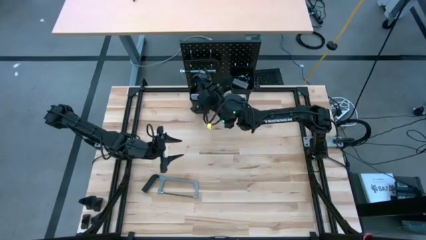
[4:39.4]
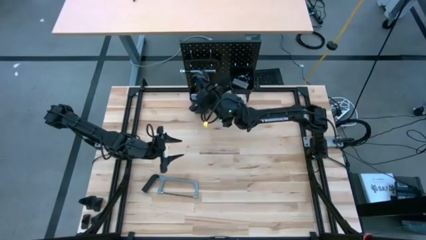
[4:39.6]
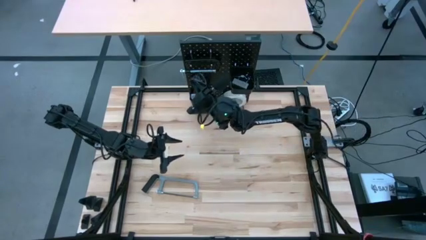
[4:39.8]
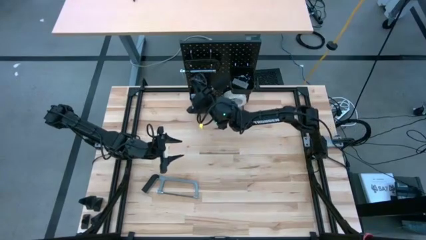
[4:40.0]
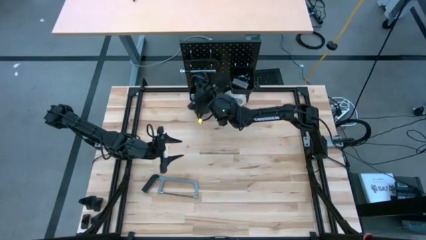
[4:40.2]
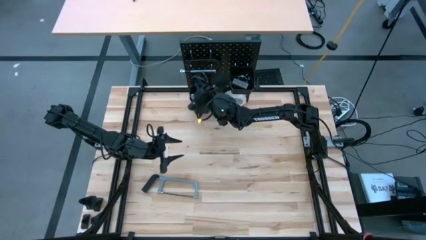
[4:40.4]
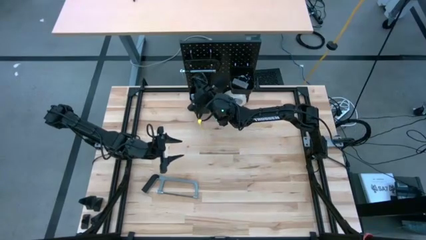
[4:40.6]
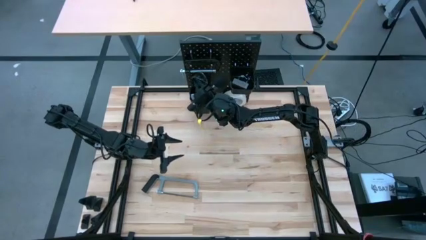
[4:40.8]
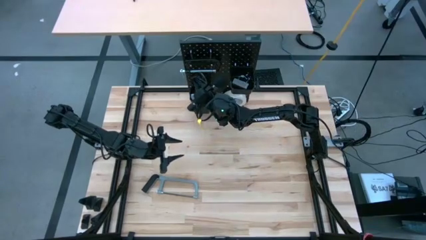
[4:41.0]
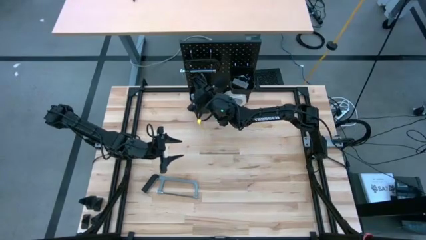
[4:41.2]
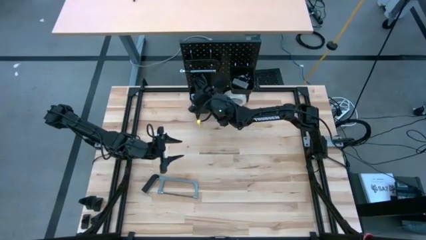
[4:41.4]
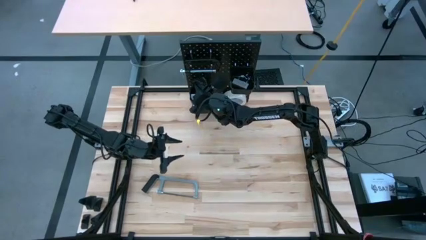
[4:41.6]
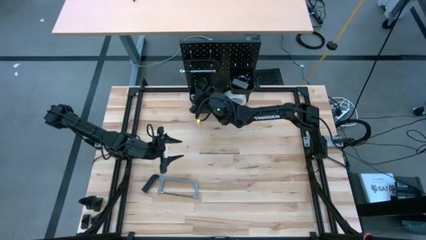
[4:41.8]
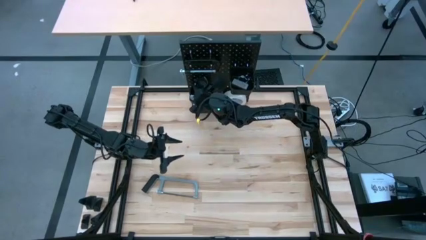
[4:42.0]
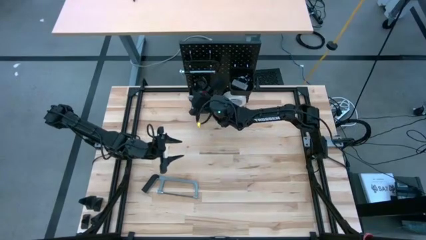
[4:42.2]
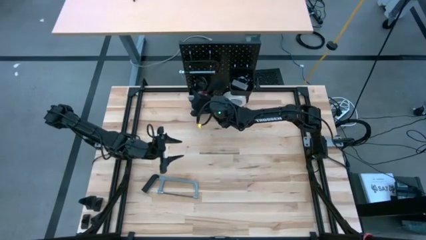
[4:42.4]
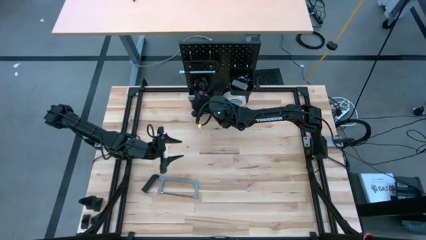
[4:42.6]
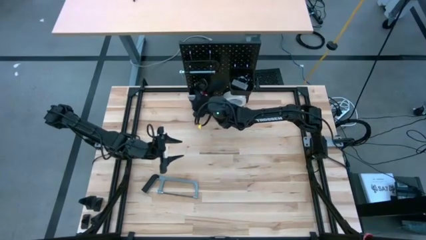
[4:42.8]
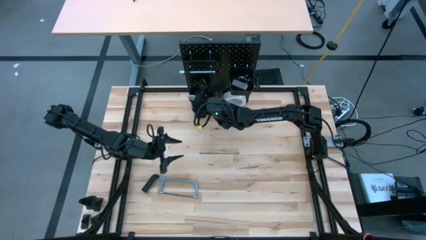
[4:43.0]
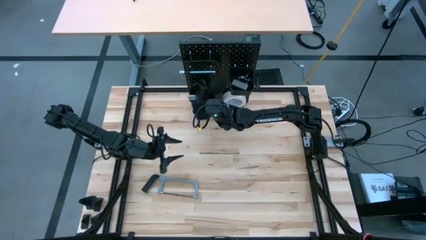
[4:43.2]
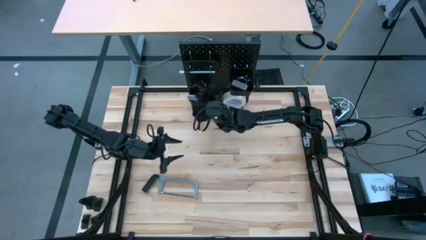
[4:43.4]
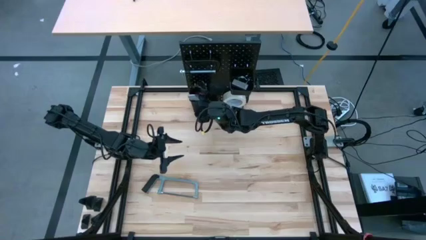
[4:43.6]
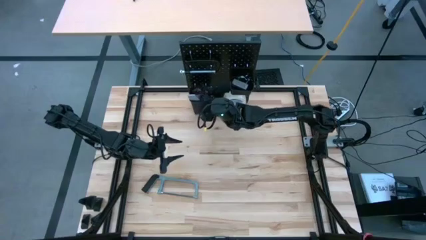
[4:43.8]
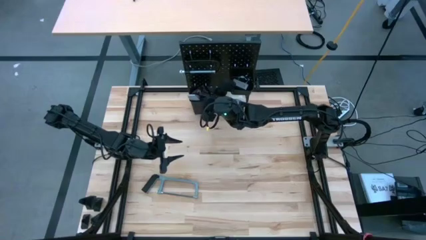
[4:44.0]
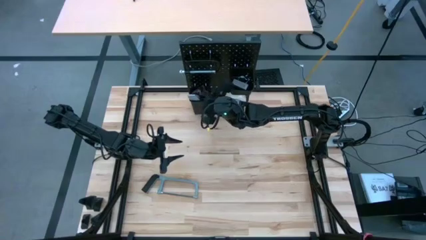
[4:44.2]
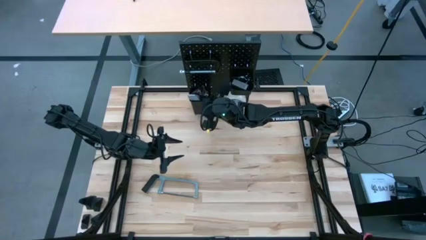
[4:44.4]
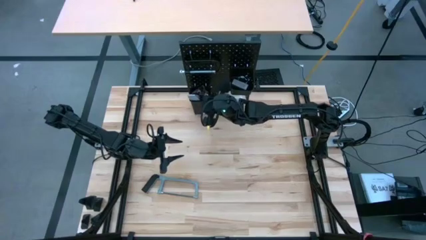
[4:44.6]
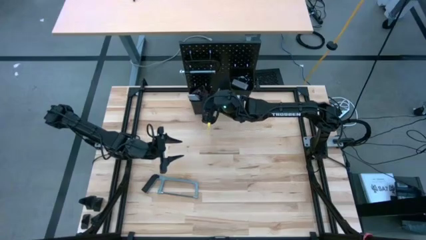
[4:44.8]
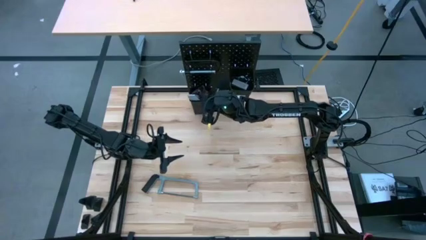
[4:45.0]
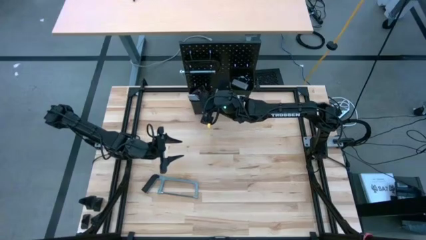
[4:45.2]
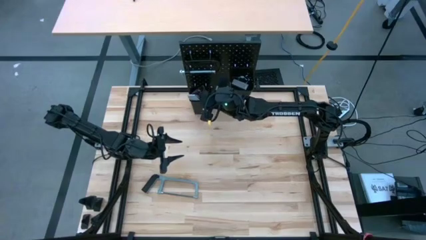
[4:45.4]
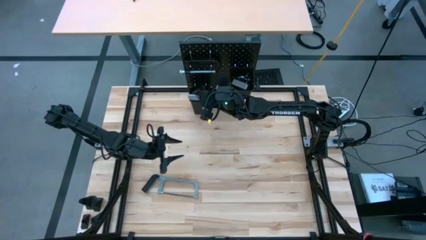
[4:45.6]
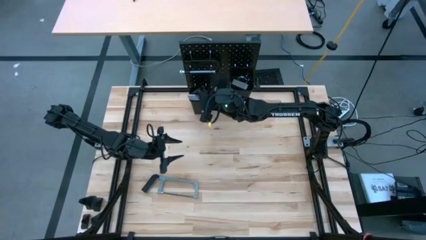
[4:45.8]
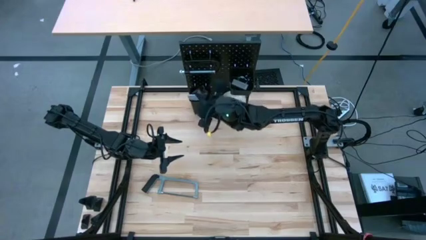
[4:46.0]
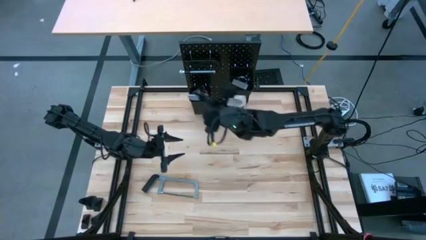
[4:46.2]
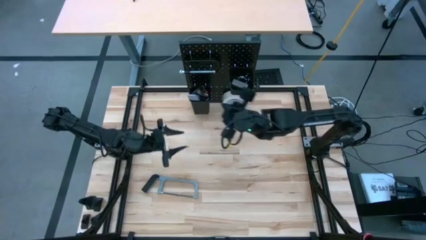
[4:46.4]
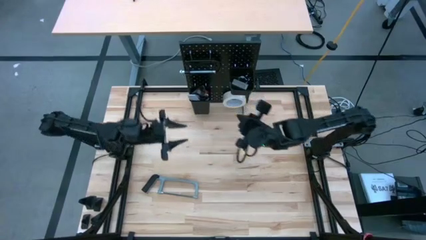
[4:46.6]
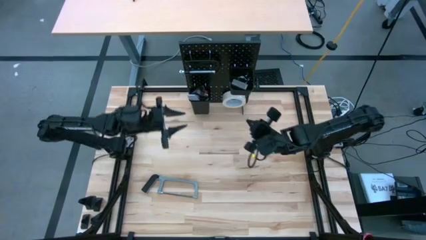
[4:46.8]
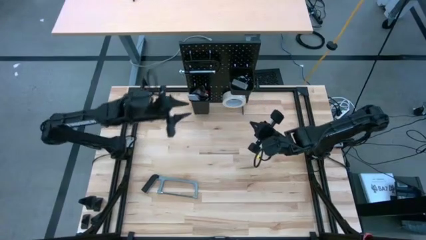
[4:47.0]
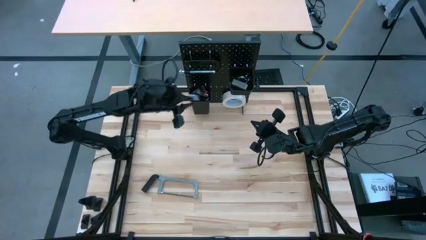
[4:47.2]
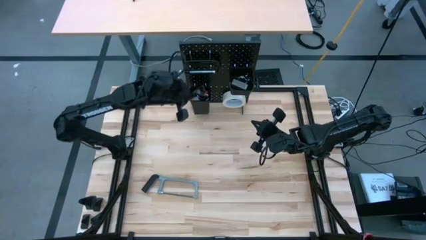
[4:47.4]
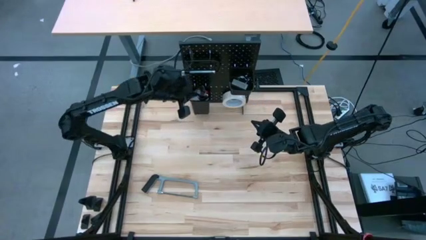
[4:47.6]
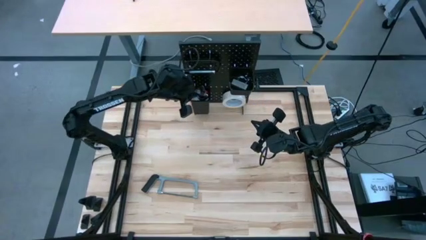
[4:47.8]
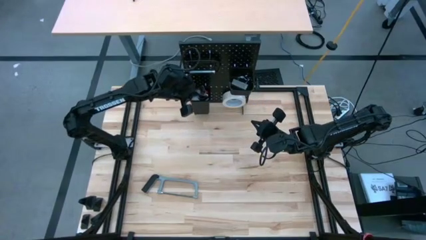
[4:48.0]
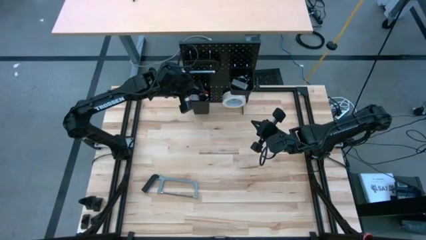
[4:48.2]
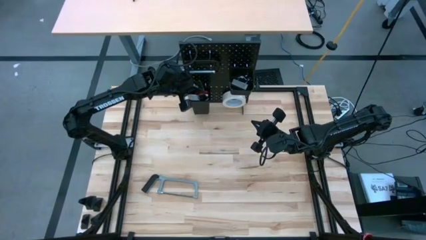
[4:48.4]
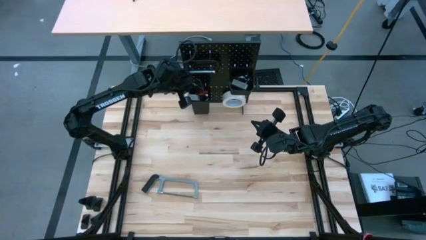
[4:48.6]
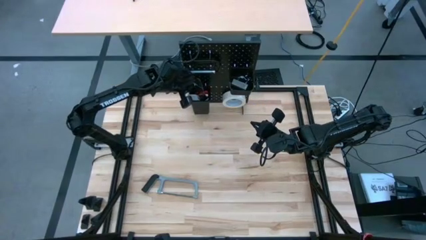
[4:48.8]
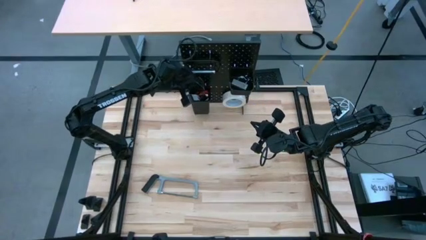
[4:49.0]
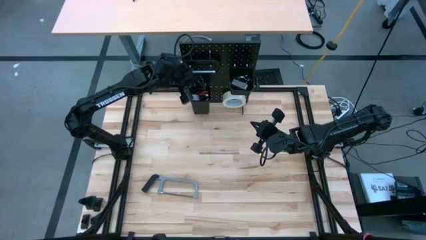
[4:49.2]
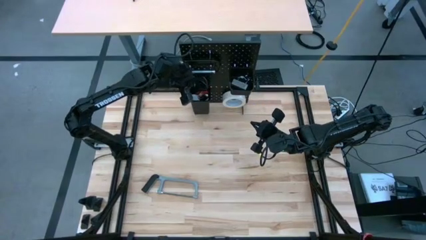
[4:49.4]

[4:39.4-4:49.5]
Task: Hang tools onto peg board
Put the black safety glasses into the left black tool bin

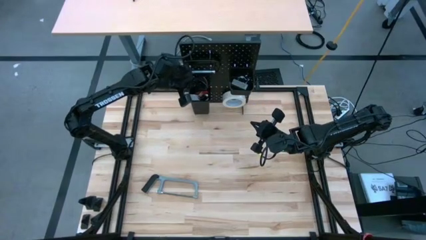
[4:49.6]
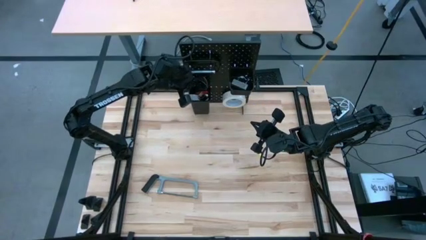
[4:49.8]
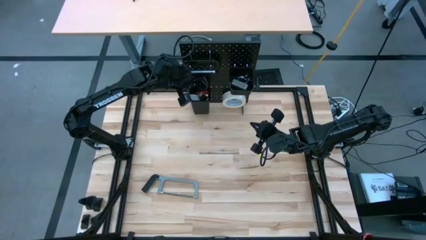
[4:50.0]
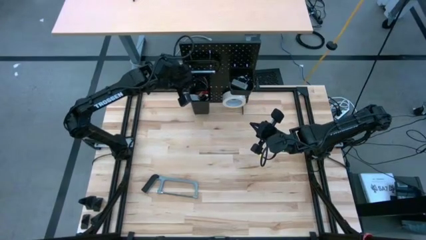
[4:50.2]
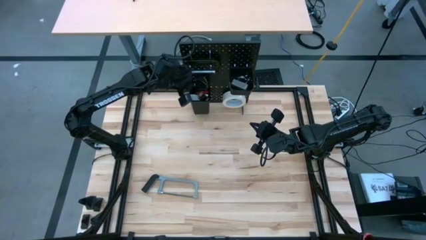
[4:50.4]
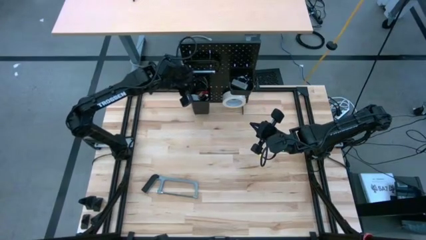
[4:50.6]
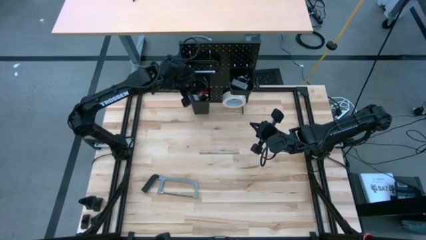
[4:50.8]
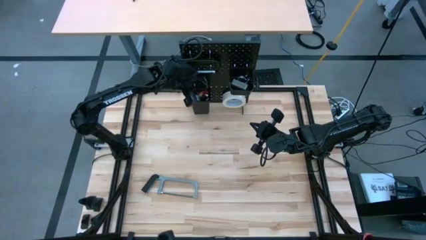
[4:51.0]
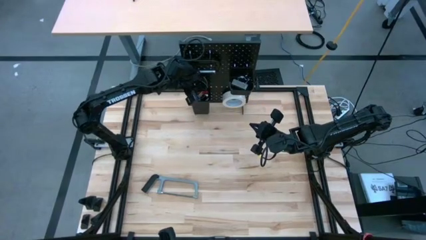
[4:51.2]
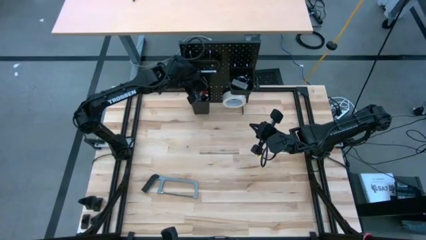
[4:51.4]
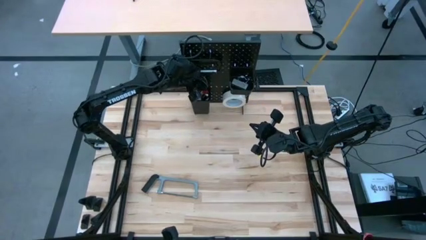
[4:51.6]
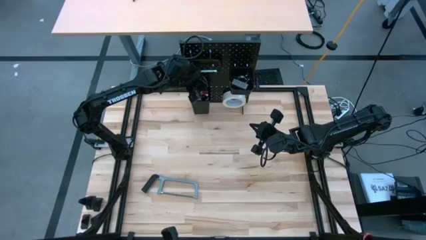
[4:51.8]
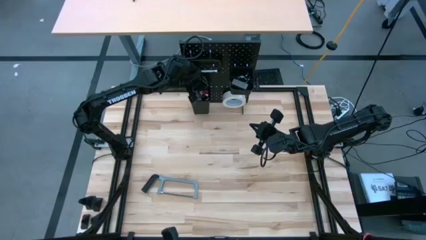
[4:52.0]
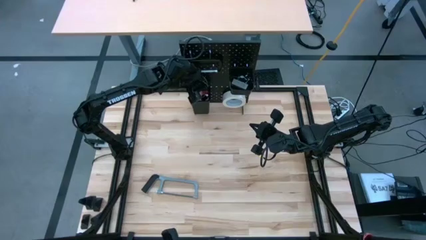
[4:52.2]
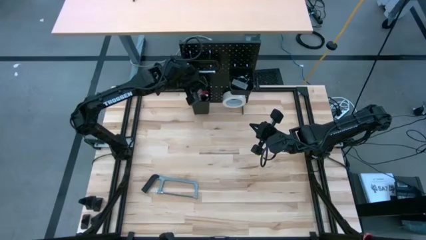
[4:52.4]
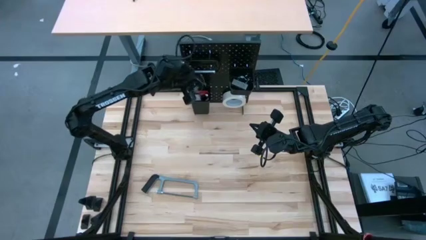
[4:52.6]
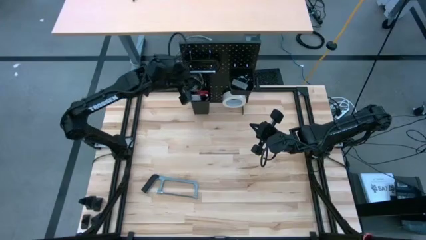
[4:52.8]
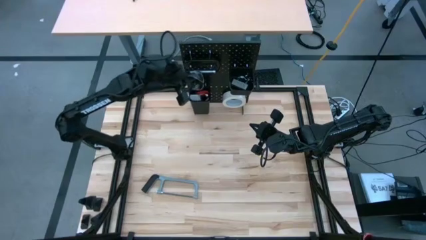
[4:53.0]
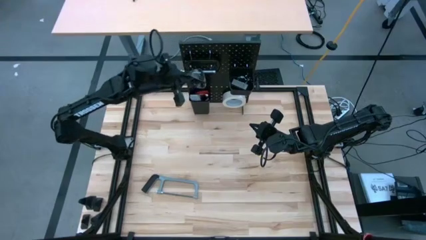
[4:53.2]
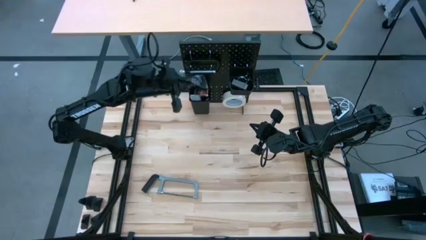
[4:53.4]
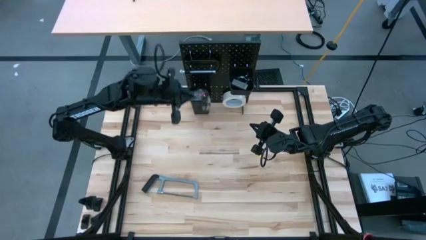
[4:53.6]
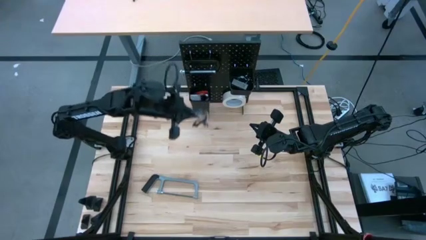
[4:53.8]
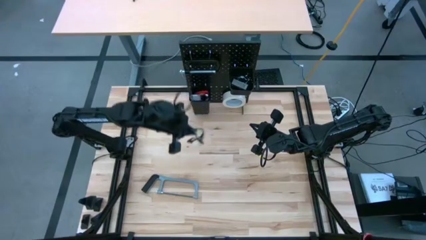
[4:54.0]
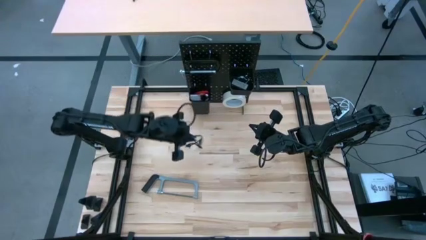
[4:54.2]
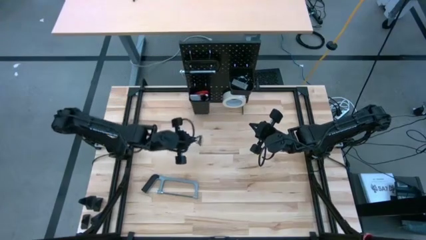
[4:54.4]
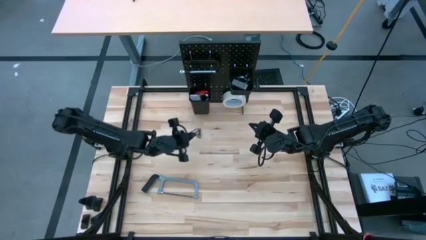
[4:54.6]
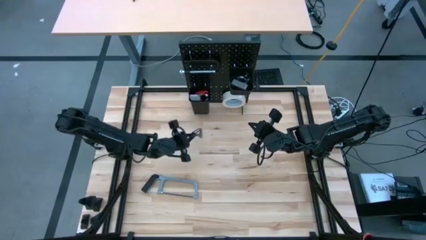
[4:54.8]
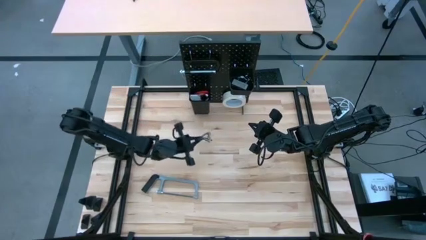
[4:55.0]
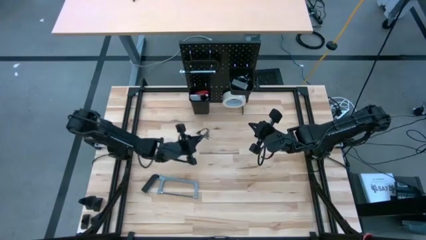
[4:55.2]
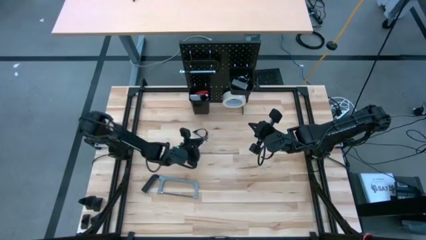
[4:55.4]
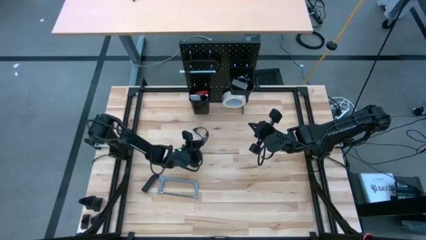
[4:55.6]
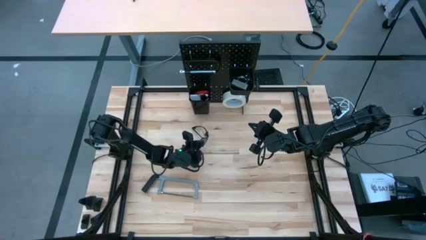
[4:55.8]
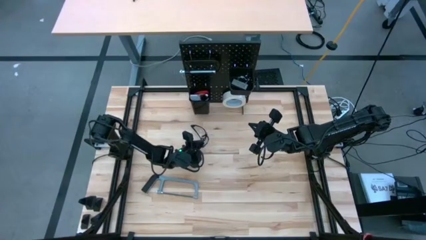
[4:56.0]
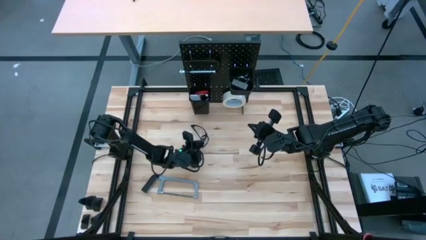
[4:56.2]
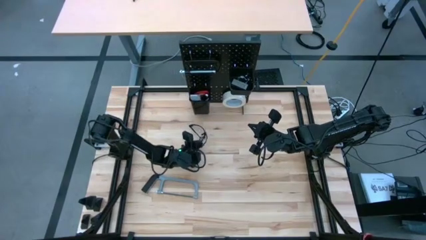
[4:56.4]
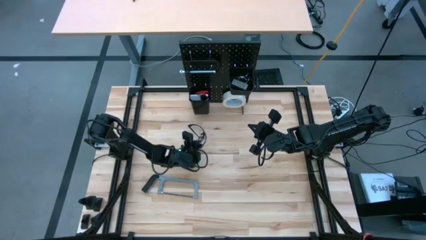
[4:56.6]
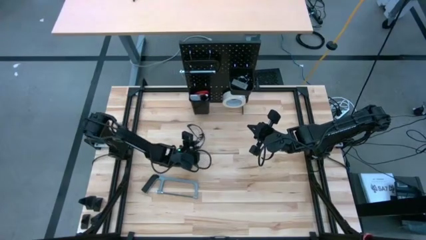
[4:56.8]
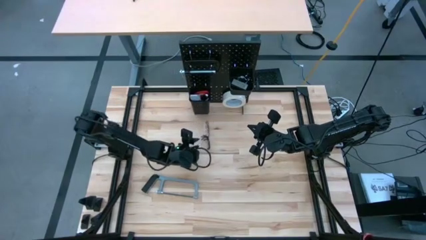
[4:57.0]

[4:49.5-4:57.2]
Remove the black safety glasses from the left black tool bin
